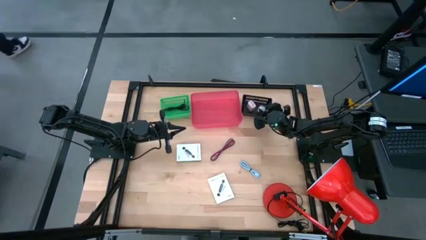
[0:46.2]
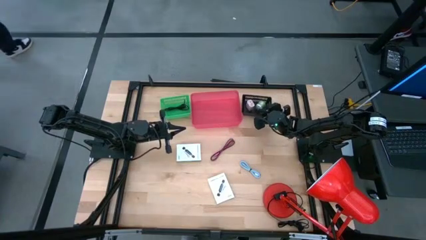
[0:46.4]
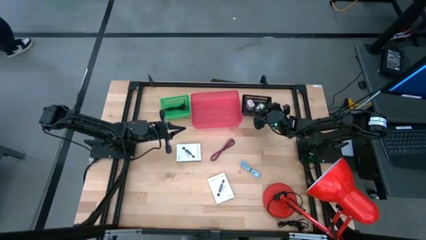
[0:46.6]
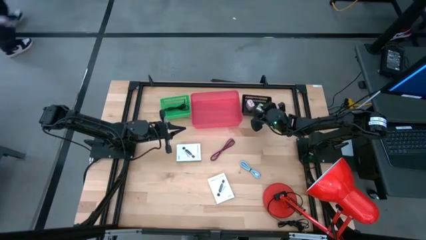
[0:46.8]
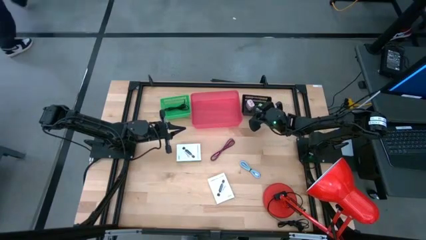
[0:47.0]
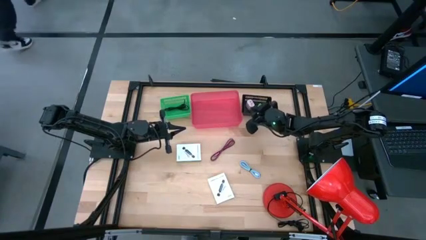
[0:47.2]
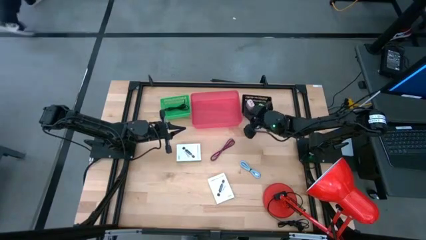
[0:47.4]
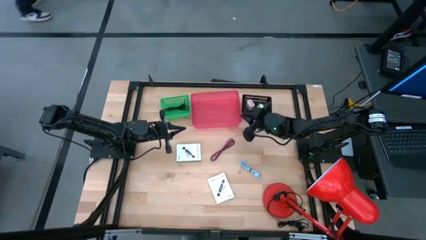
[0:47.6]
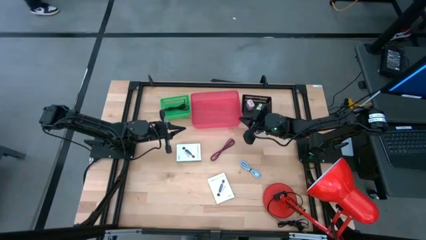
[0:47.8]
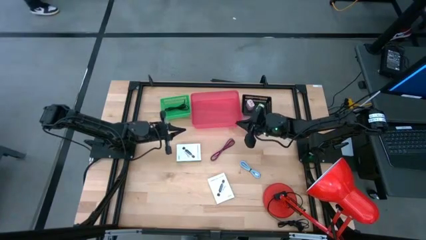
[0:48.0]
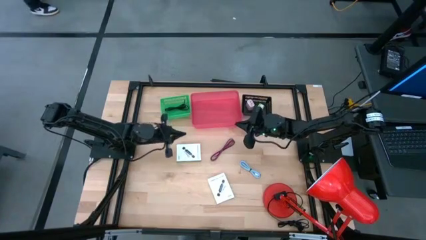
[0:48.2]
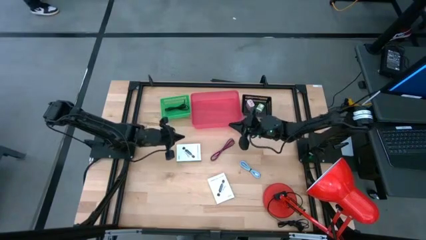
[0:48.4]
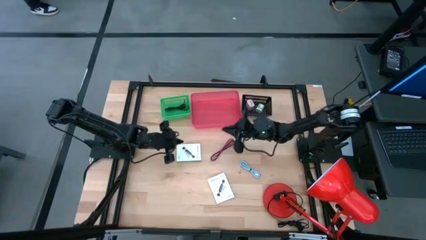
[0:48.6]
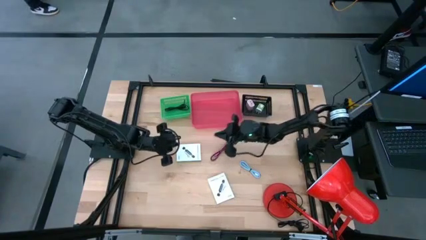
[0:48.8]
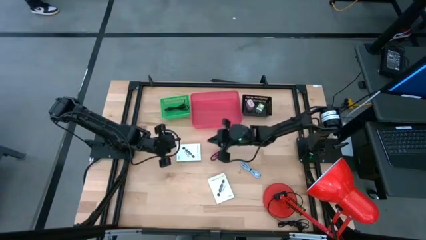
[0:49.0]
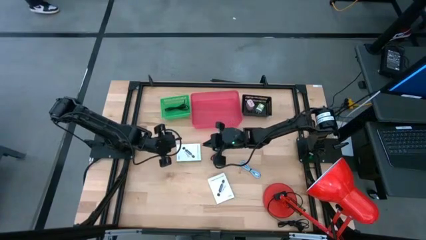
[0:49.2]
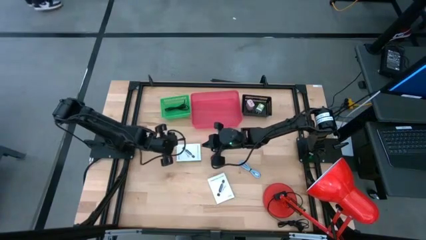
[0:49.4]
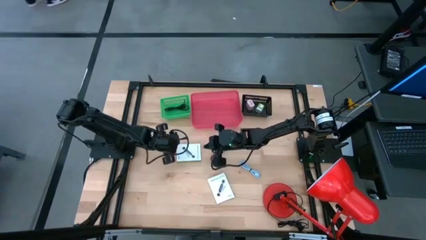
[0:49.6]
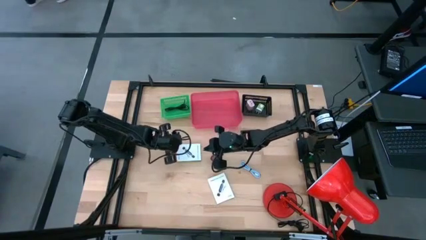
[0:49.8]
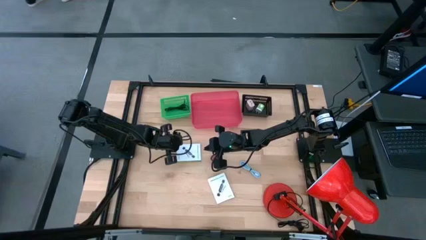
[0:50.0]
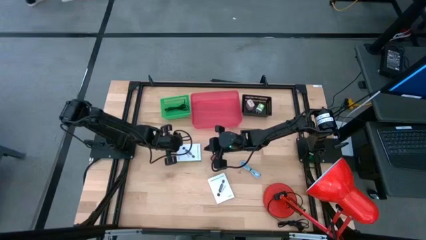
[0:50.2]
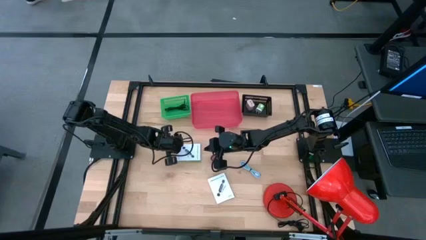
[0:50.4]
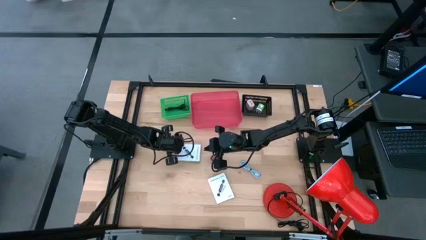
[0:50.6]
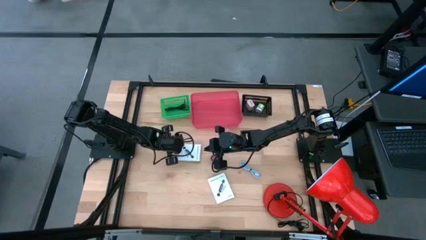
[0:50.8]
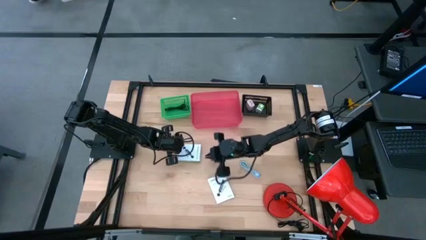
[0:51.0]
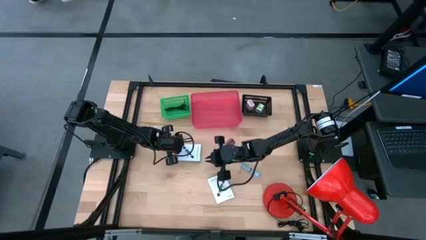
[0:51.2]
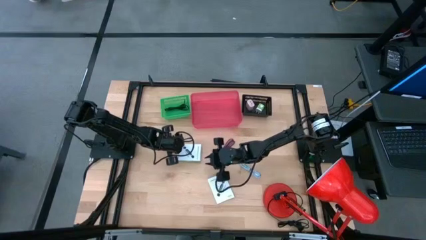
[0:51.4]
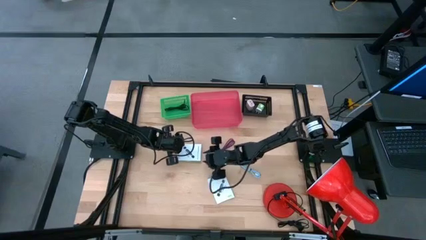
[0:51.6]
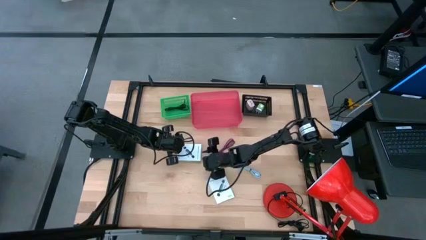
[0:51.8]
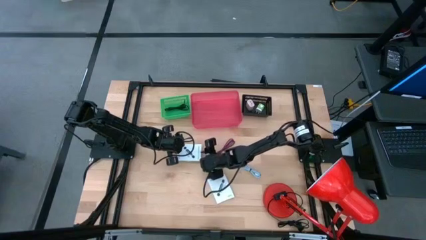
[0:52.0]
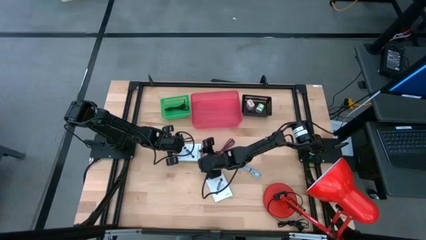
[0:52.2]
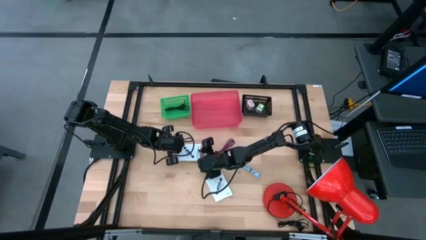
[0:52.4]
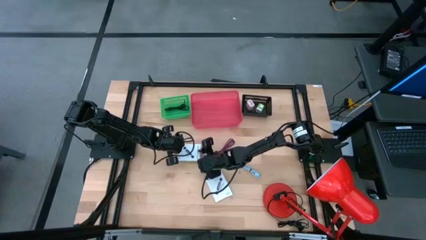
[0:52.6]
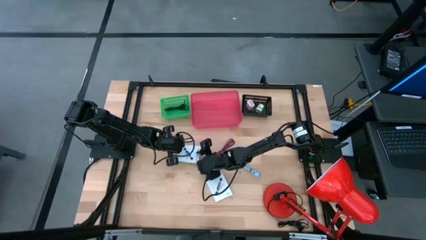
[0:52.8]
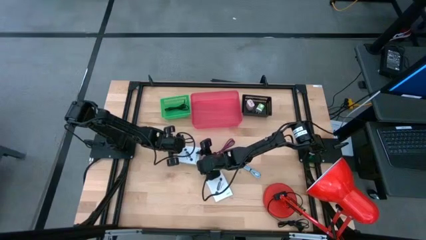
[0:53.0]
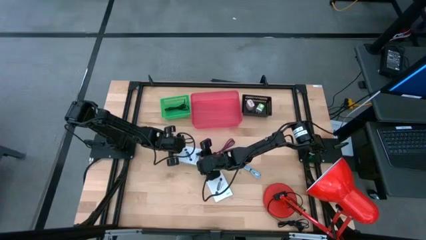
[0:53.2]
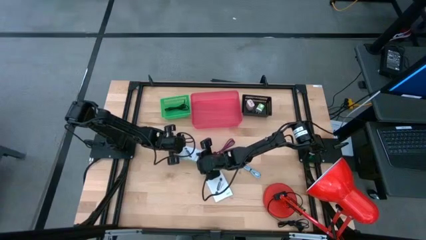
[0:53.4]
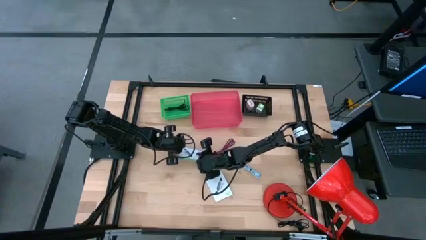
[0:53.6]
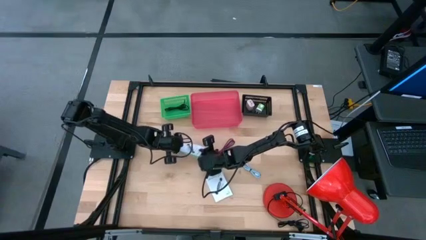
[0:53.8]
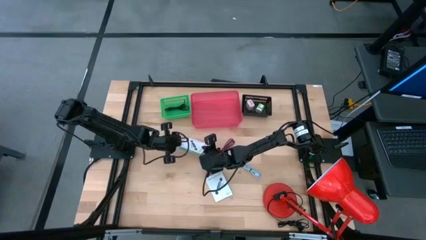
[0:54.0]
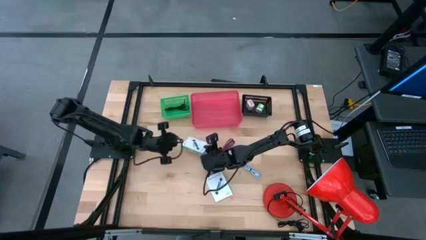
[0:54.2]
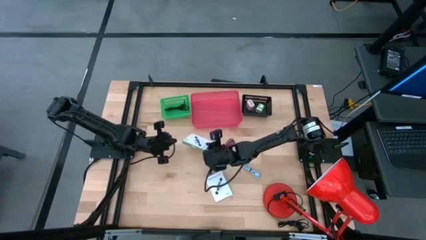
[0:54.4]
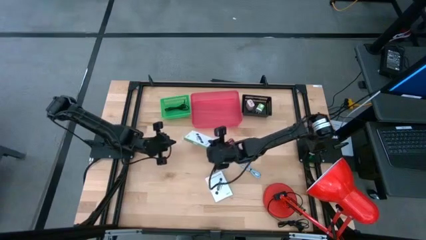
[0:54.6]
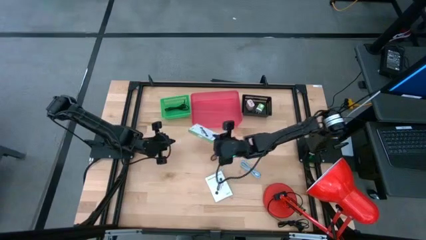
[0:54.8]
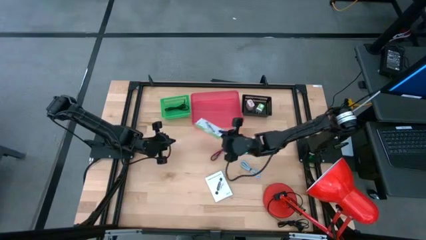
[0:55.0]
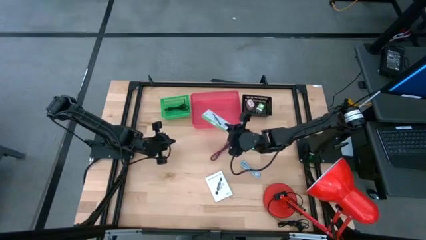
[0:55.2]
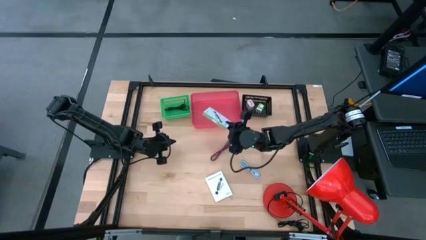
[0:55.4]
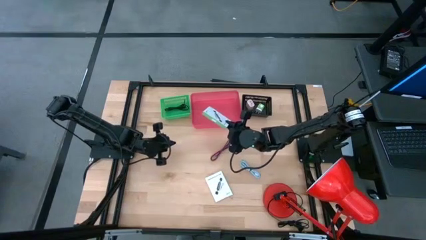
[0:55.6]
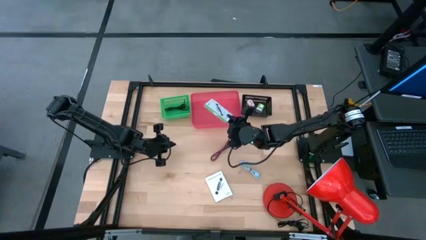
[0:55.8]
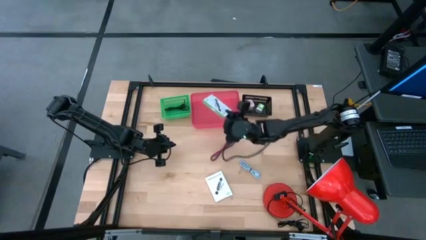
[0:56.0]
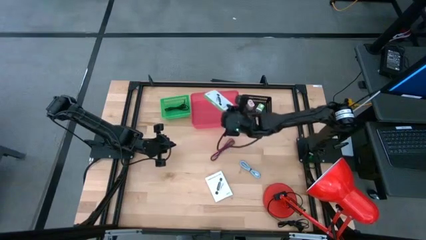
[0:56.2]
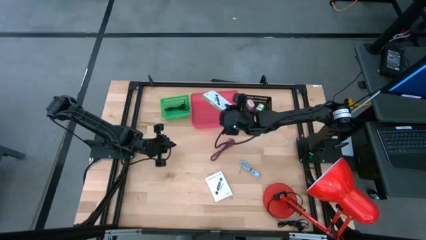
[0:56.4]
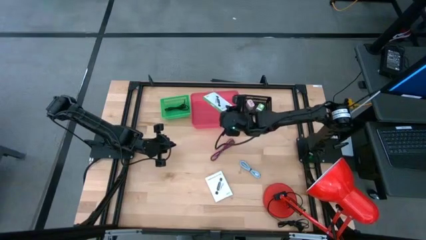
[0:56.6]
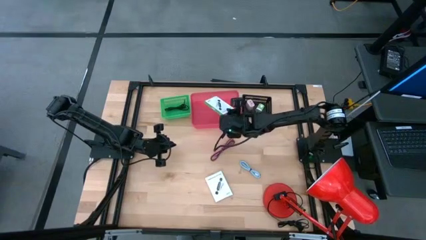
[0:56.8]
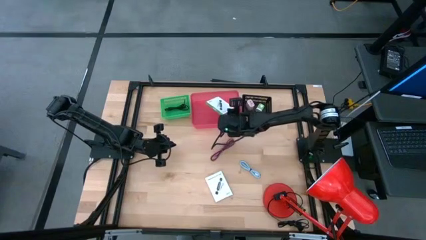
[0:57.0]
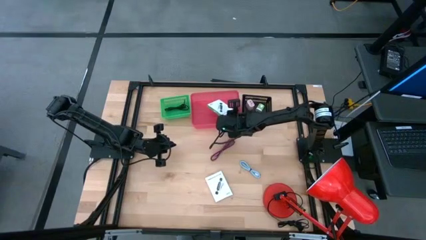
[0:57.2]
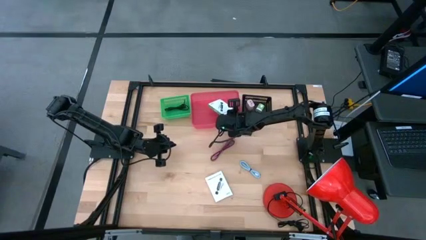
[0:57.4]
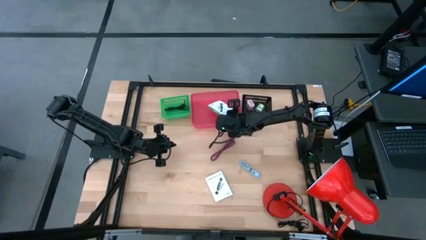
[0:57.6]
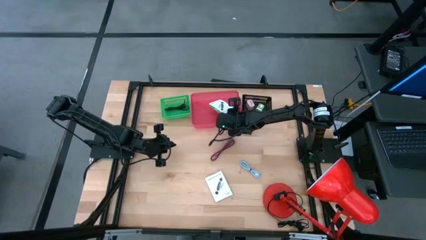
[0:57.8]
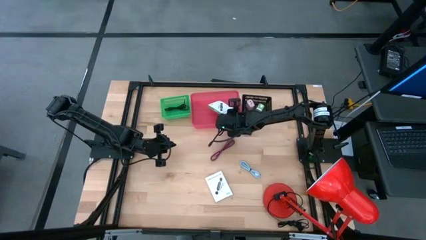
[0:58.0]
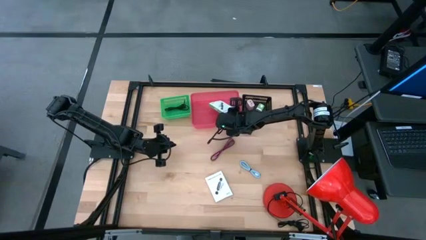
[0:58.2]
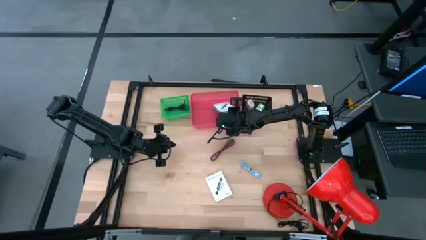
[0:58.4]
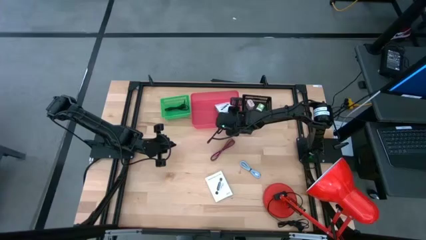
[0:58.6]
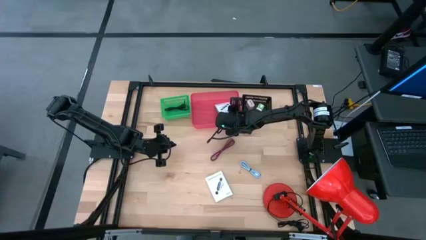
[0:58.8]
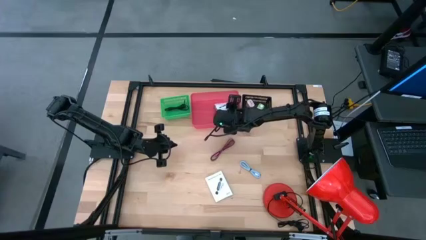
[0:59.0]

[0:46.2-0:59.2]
Task: Pick and place items into bin
Put the top white card reader box into the red bin
